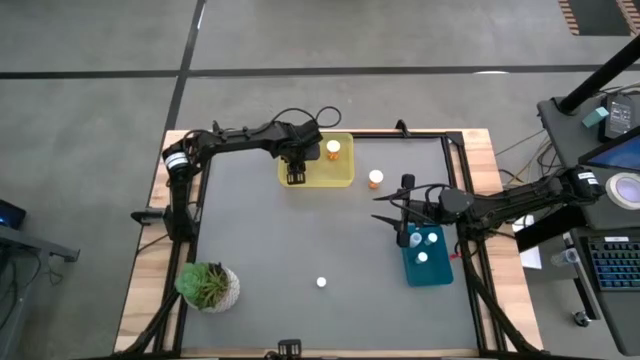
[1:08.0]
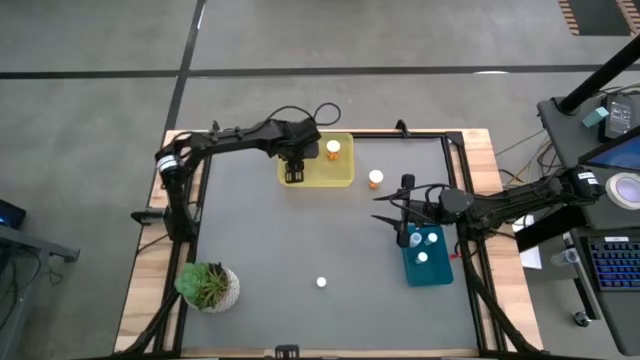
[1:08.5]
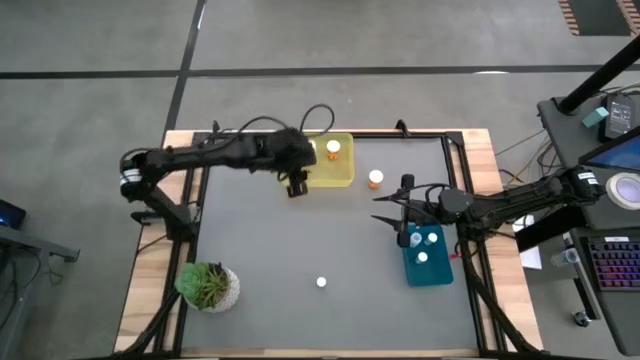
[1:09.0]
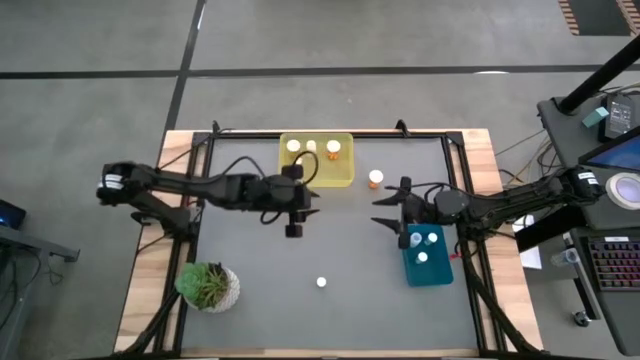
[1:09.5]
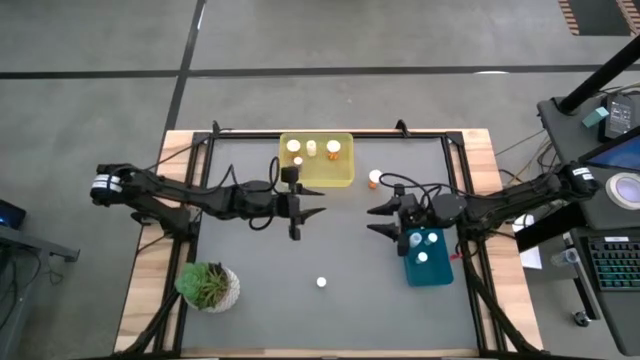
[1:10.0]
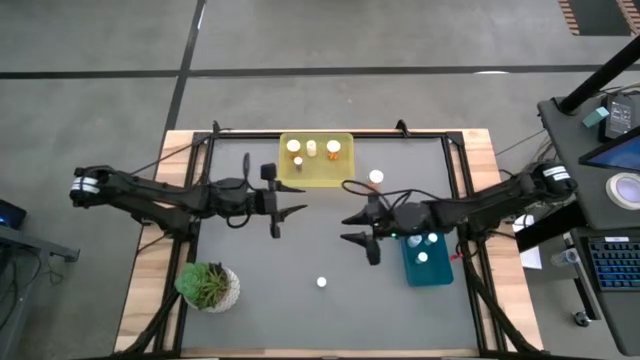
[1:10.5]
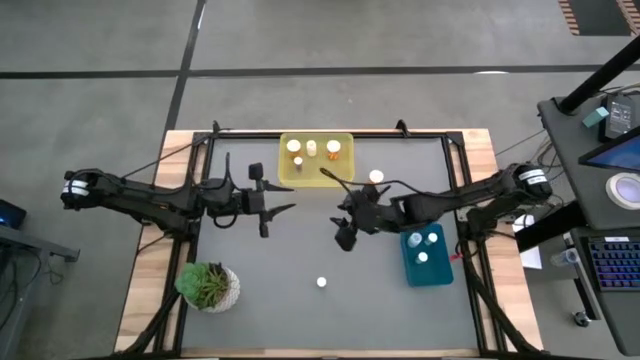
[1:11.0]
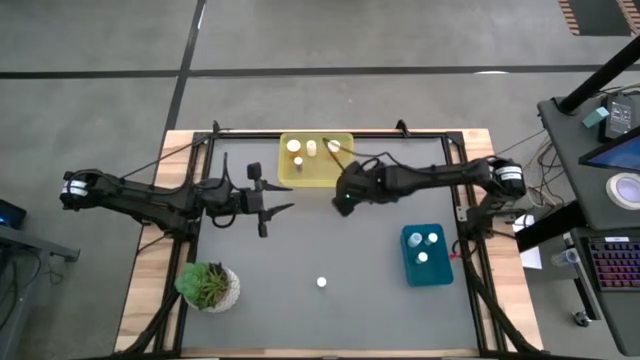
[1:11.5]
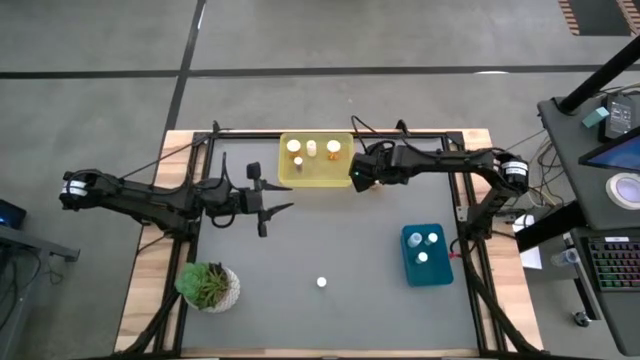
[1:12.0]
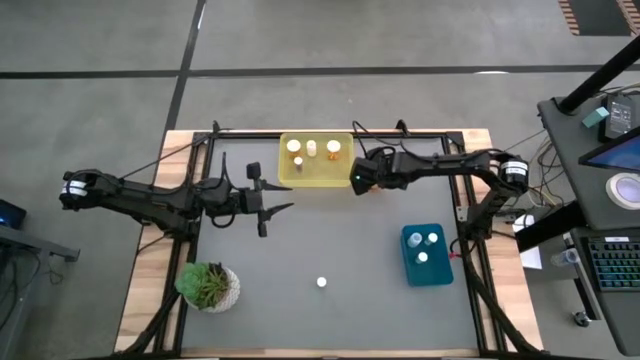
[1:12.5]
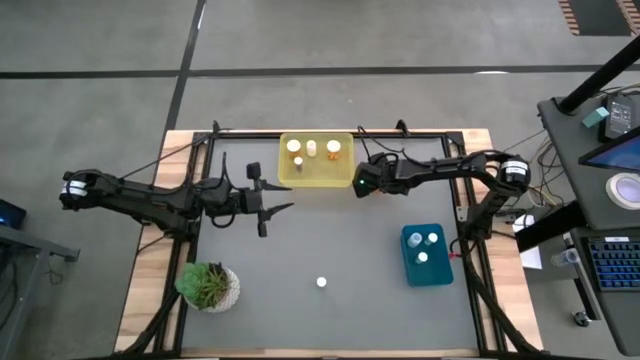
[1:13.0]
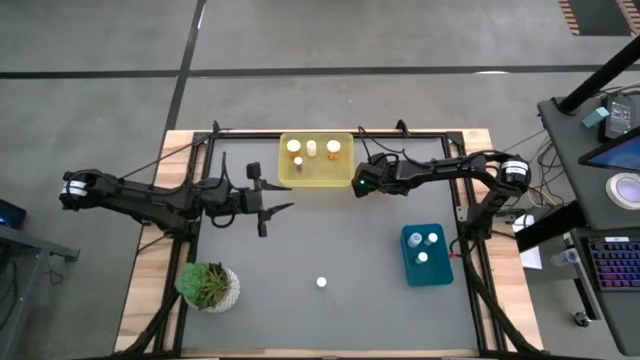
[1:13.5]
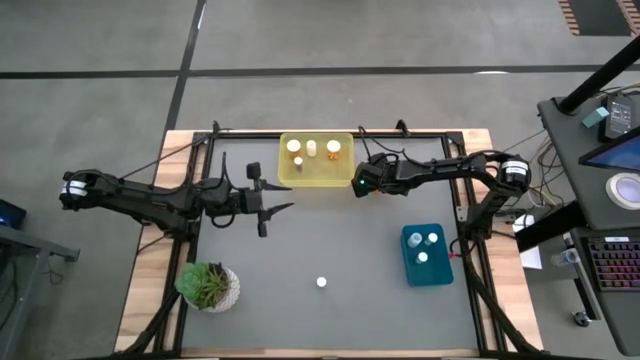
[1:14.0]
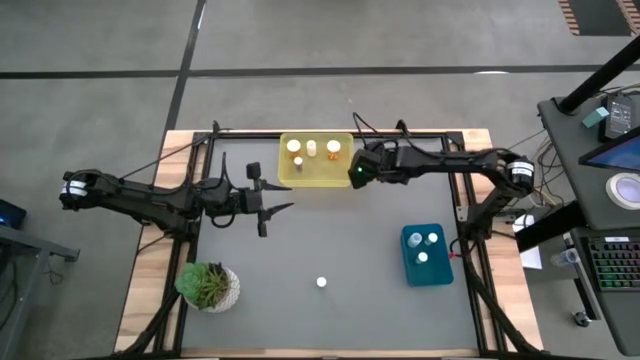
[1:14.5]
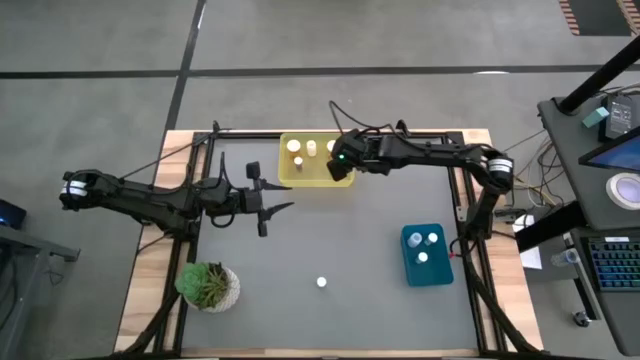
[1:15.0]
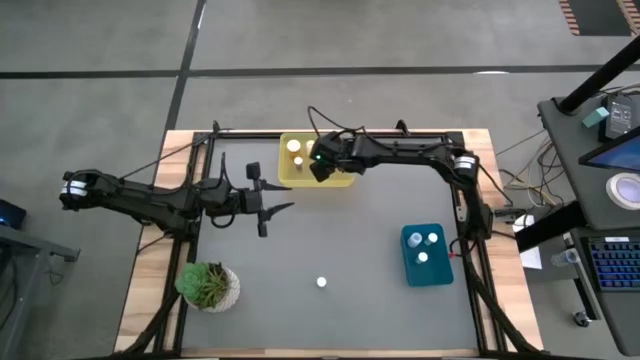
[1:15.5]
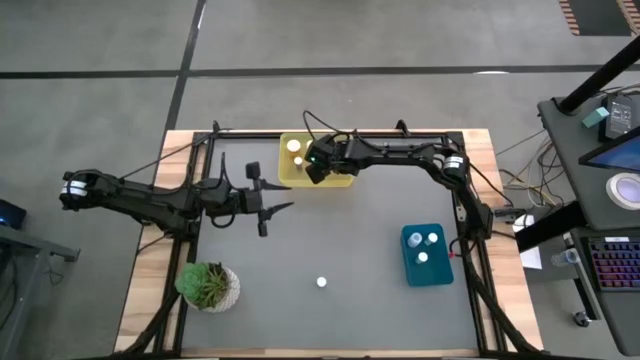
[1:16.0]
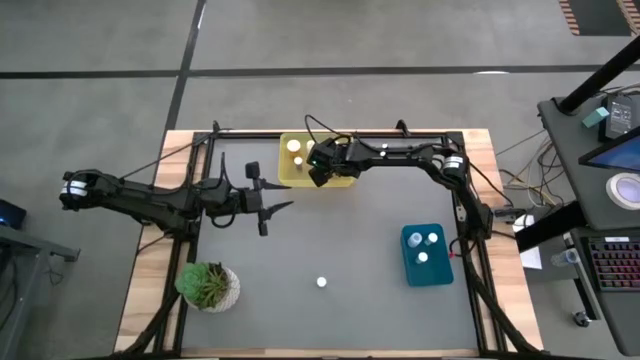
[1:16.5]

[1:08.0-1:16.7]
Task: Pick and place medicine bottles into bin by pill shape (circle, oval)
Put the orange pill bottle into the yellow bin

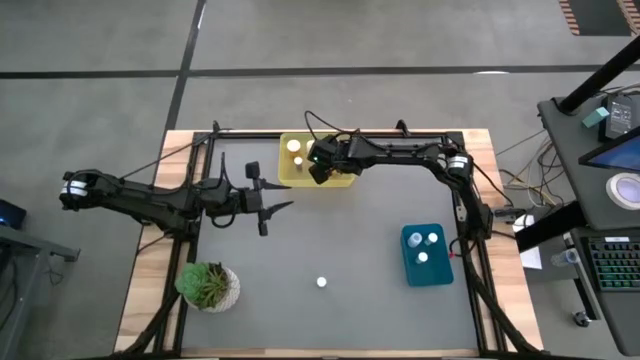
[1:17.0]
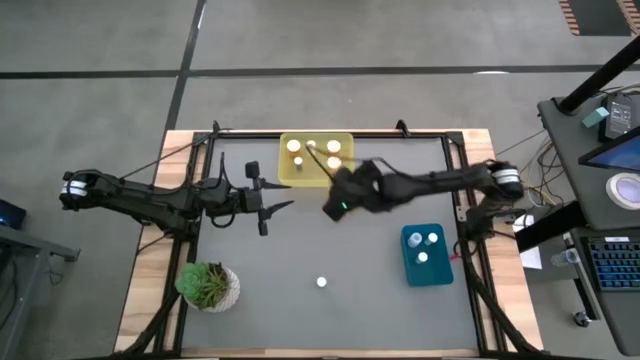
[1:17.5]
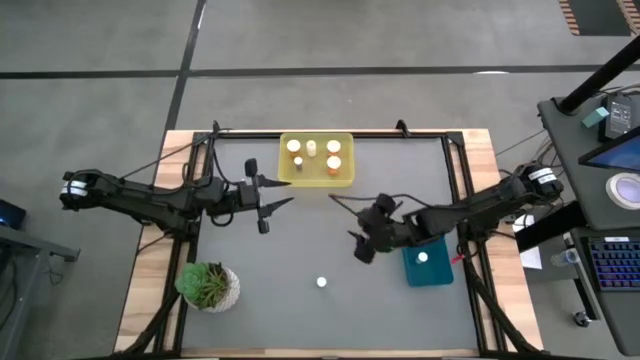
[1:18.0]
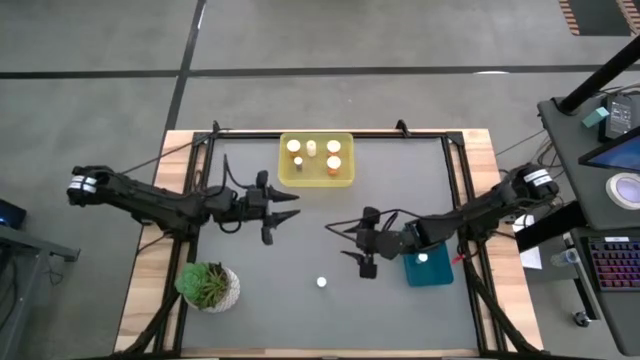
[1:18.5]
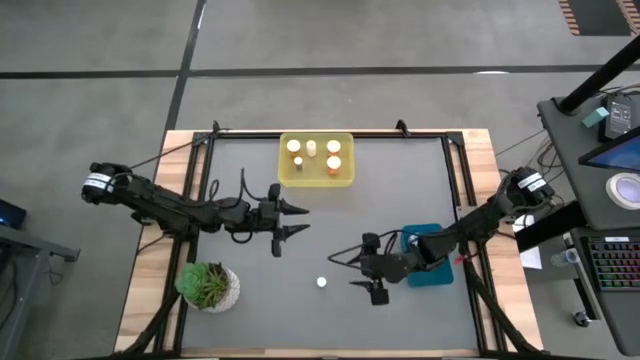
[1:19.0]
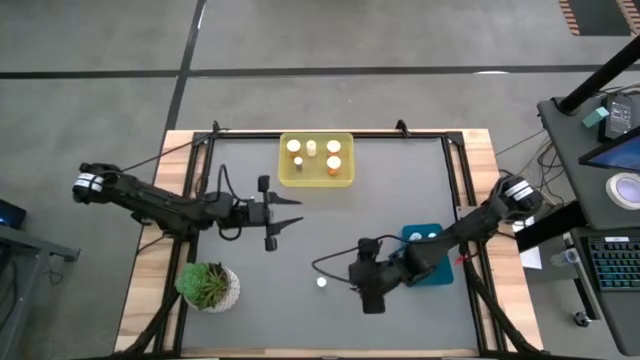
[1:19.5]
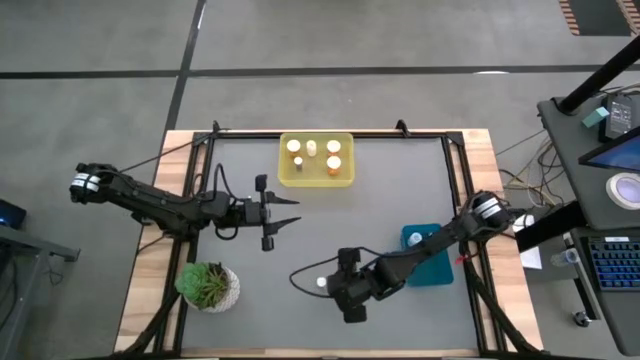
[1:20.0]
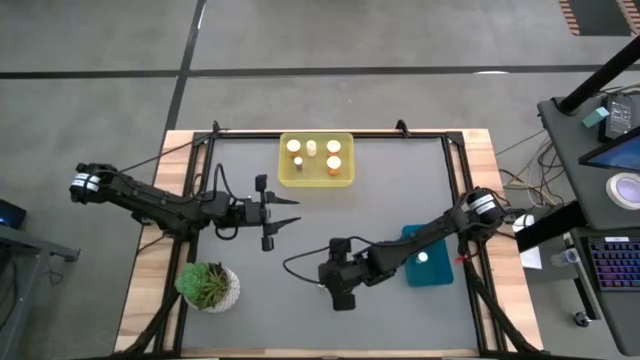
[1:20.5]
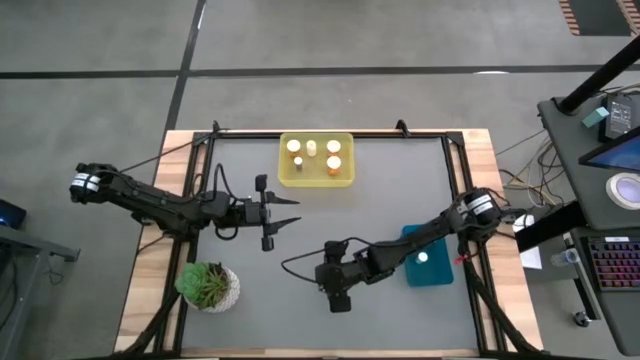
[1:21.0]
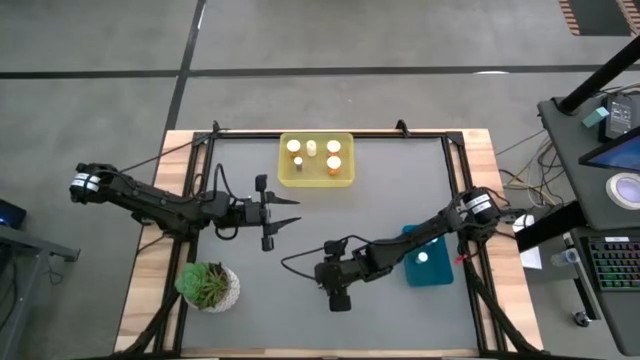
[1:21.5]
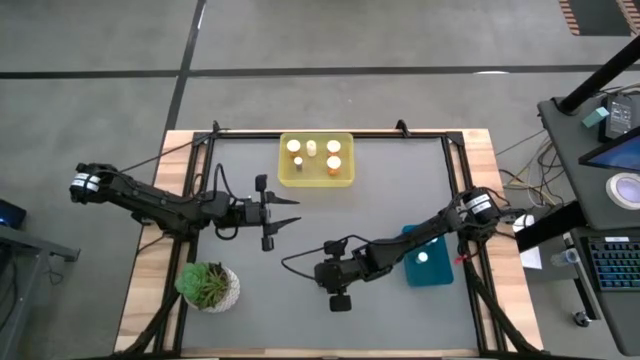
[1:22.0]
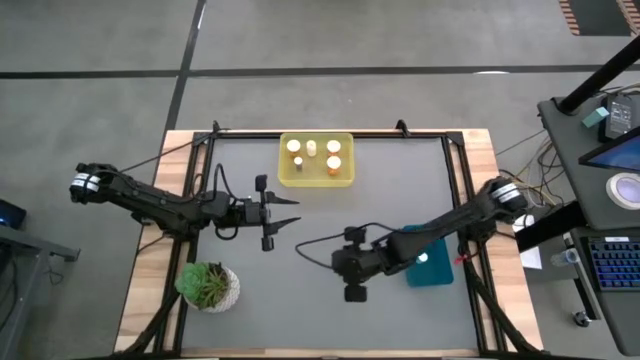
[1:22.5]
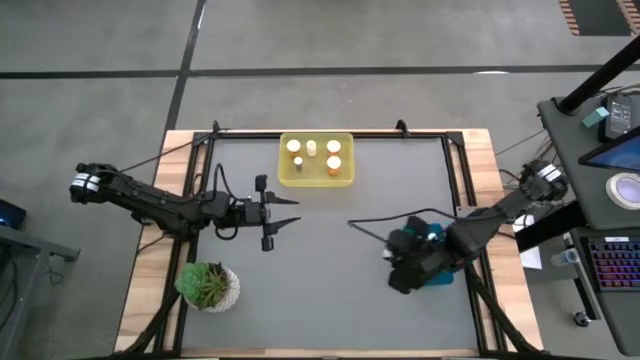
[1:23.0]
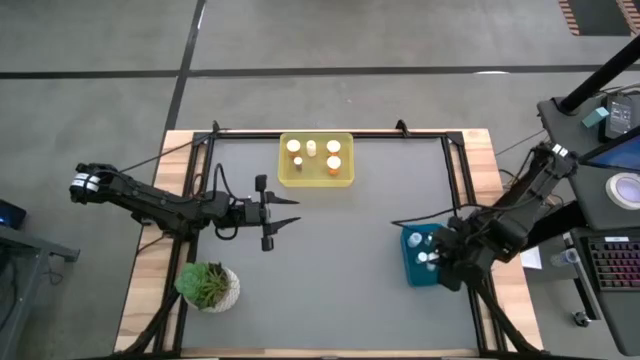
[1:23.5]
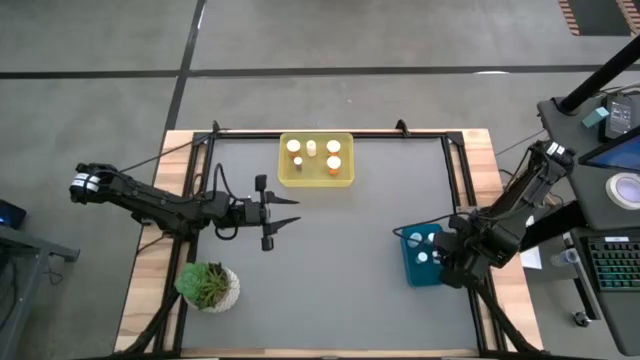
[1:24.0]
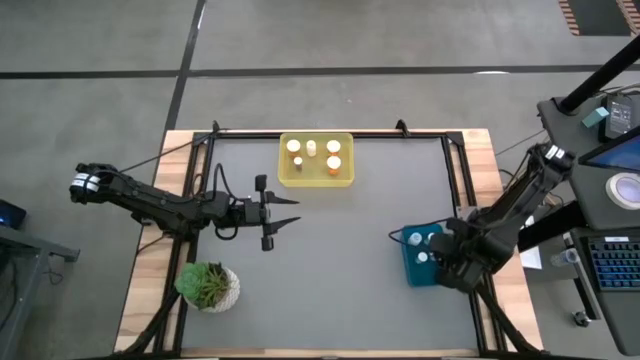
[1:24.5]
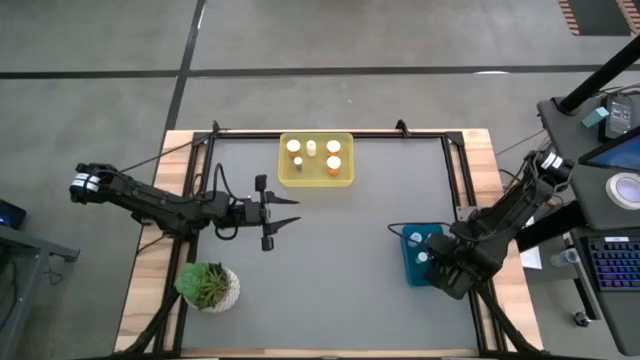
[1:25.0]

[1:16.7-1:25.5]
Put the blue pill bottle into the blue bin

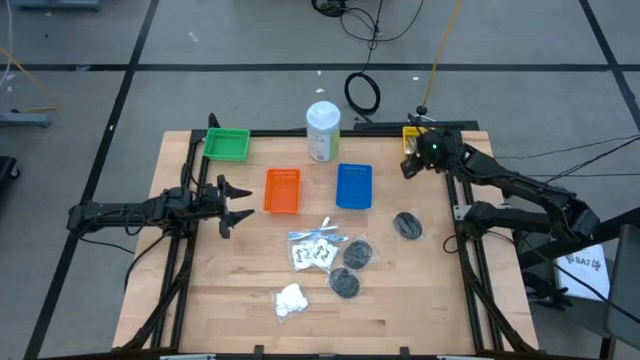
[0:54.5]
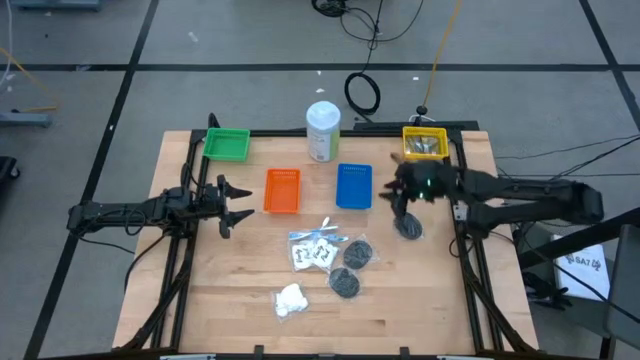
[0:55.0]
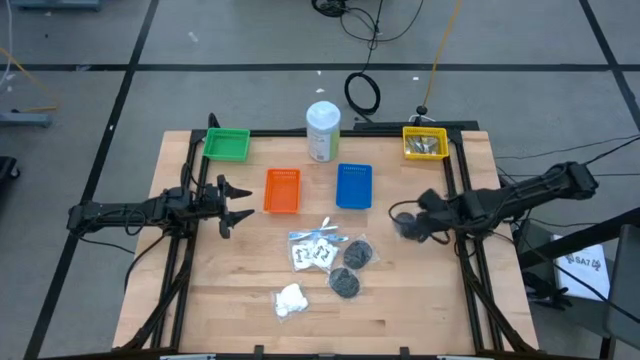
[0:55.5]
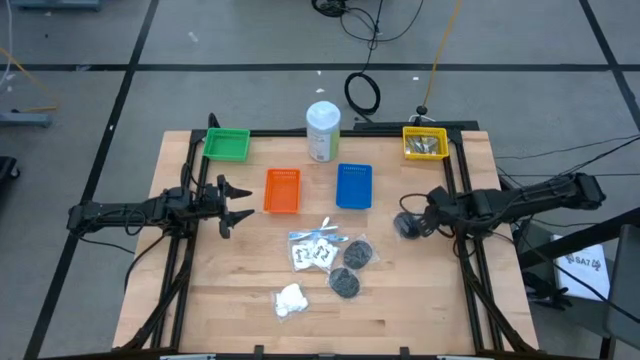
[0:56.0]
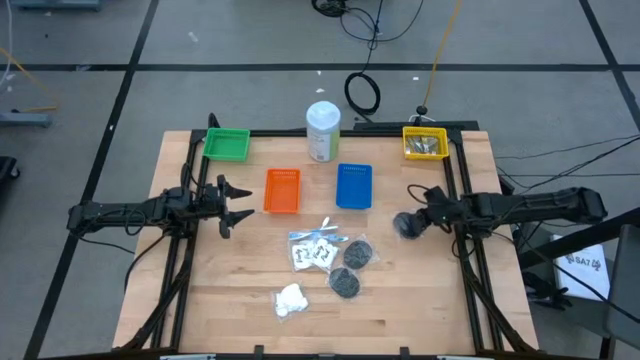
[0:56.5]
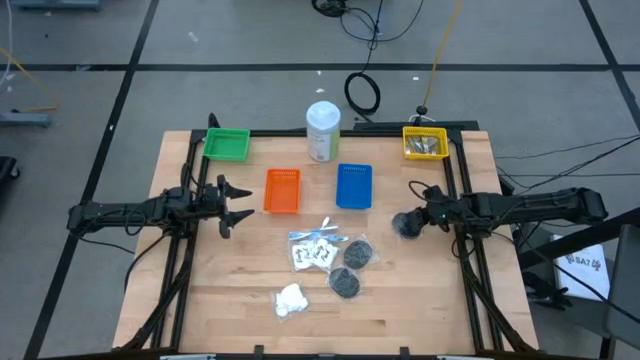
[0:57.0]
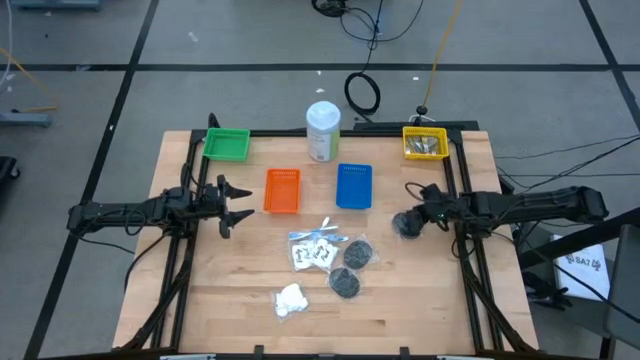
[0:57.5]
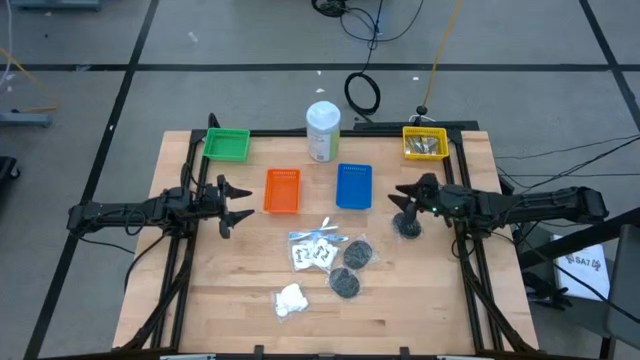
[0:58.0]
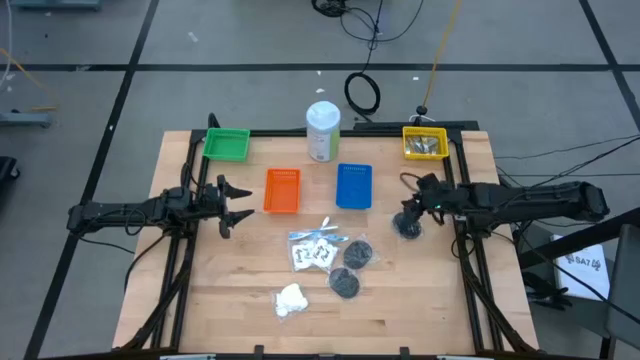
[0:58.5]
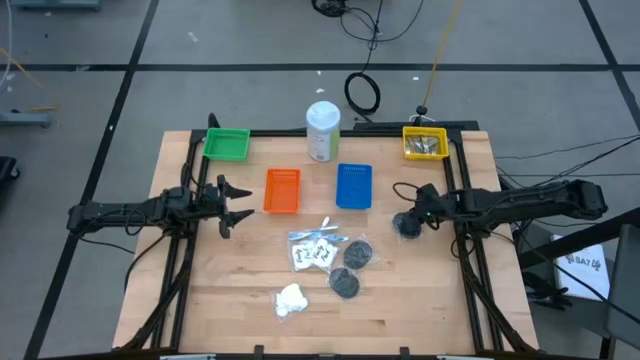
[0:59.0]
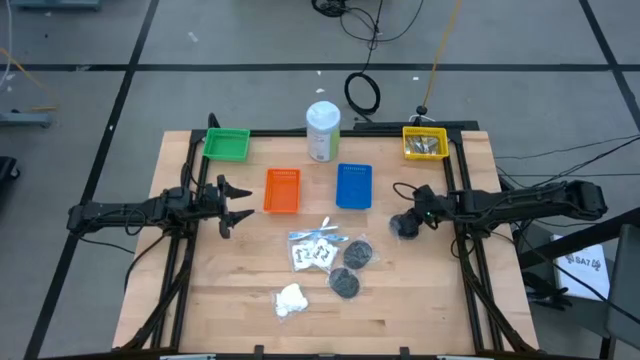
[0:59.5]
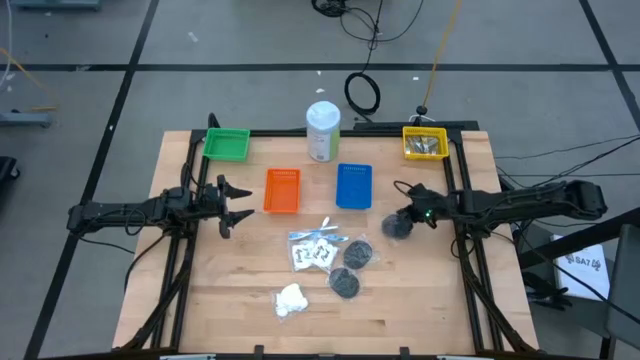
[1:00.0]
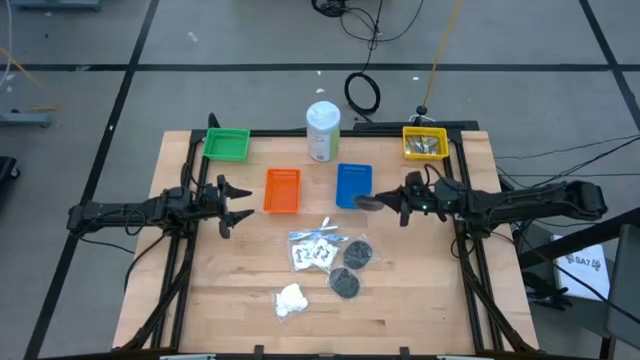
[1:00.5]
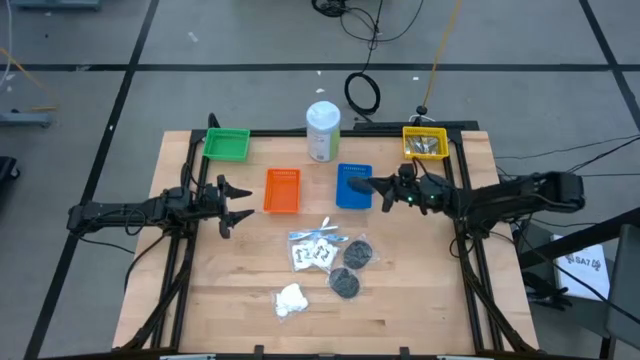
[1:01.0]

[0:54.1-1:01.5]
Task: Pick & Place Travel size toiletries
Put the top hairbrush into the blue bin
